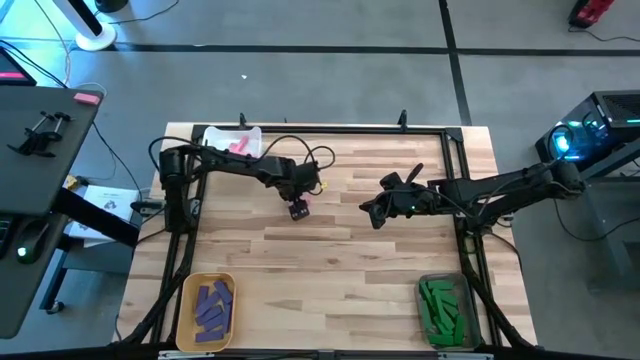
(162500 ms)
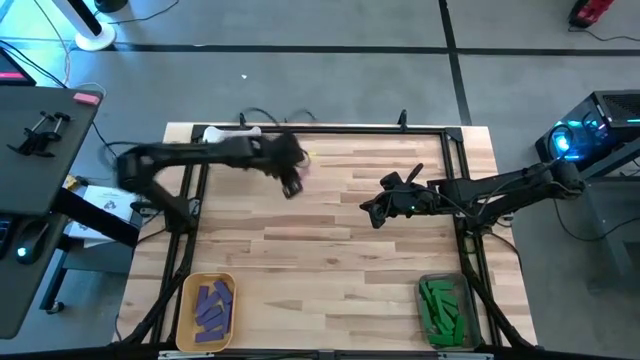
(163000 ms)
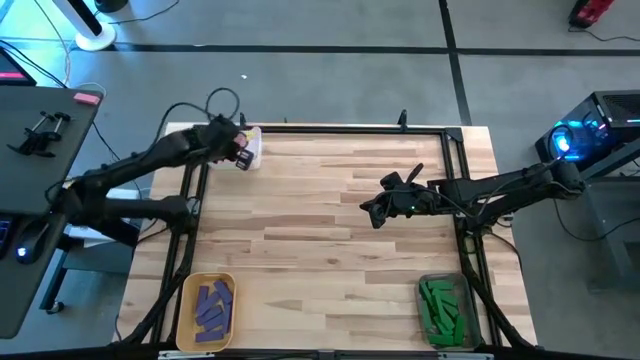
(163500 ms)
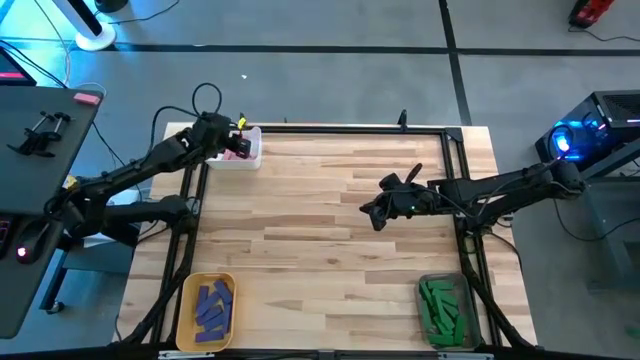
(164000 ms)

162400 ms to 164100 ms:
Task: Sort blocks
Put the pink wooden block into the white bin

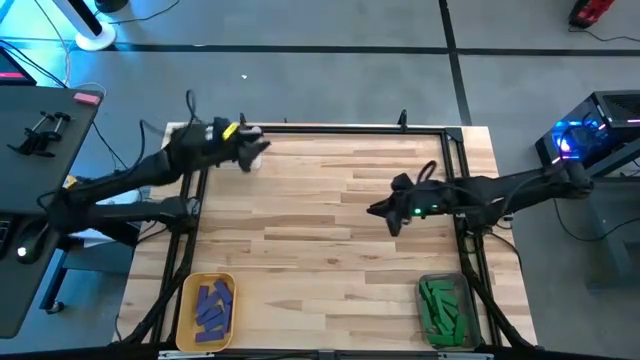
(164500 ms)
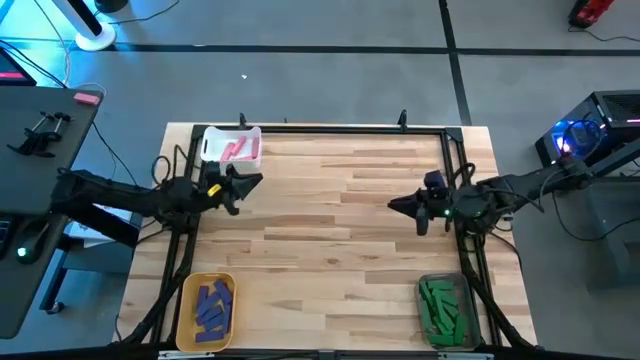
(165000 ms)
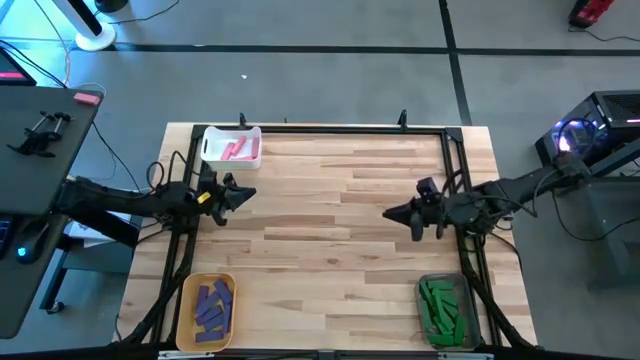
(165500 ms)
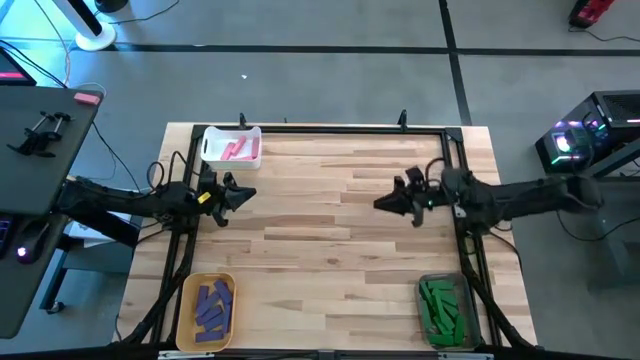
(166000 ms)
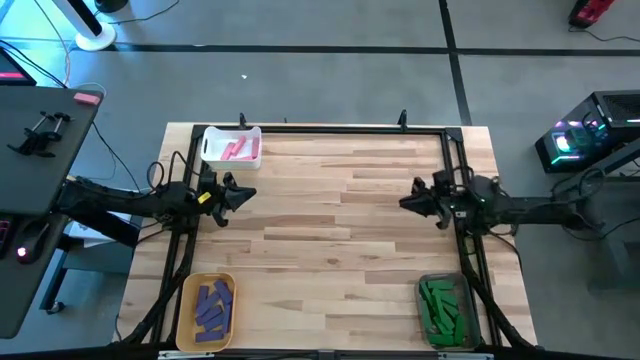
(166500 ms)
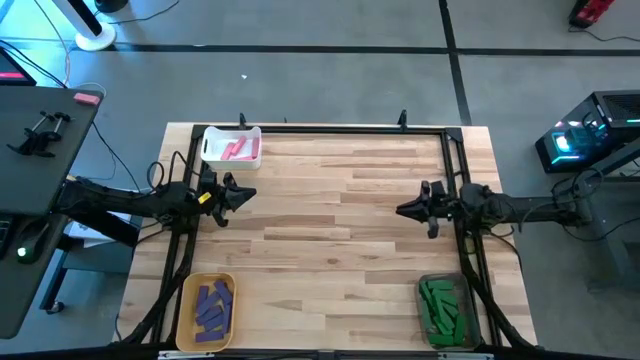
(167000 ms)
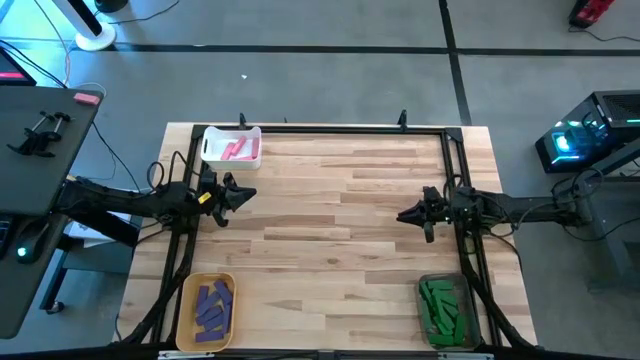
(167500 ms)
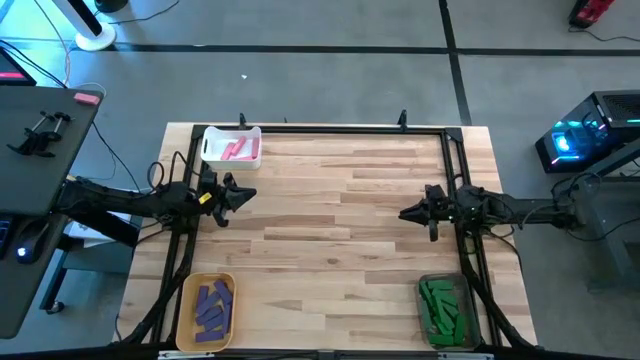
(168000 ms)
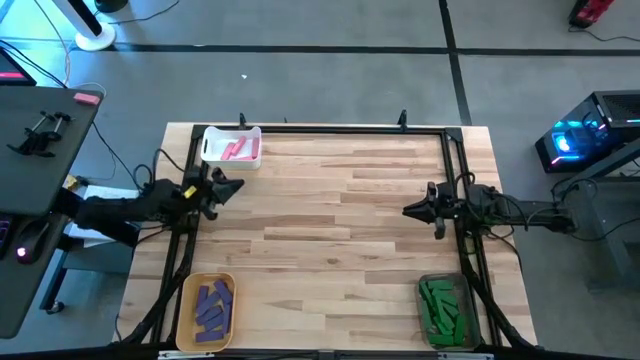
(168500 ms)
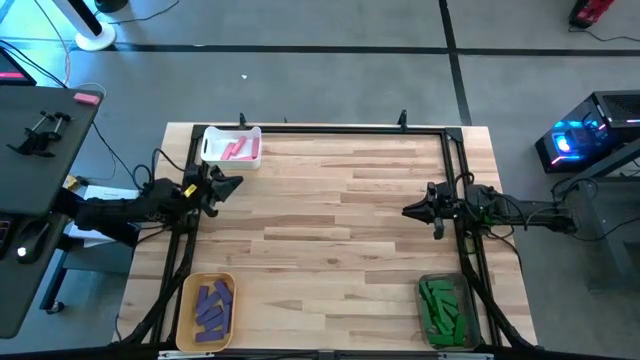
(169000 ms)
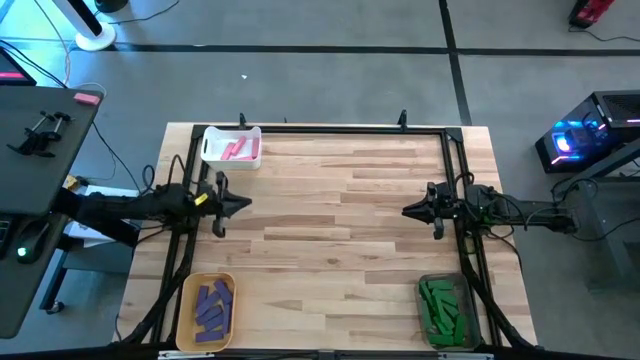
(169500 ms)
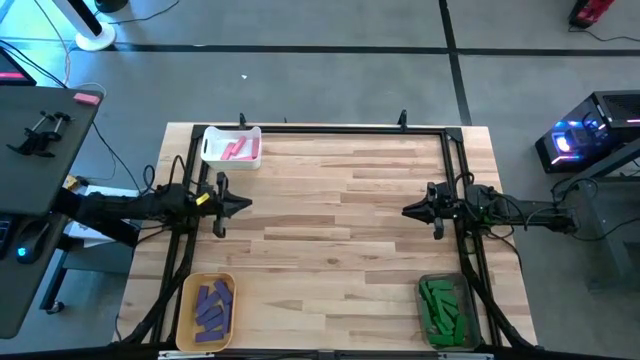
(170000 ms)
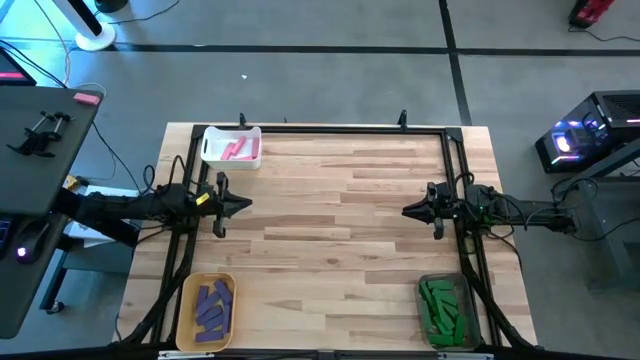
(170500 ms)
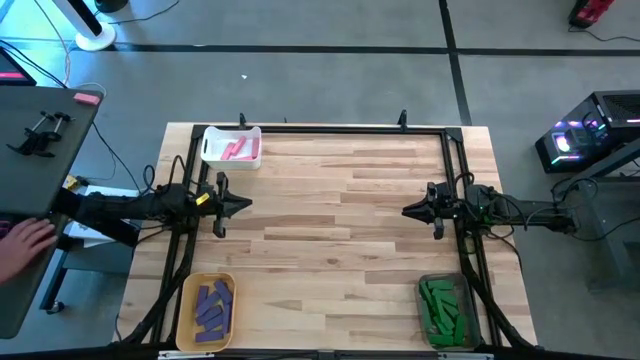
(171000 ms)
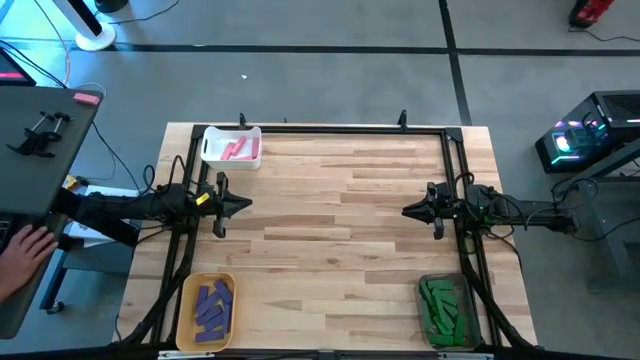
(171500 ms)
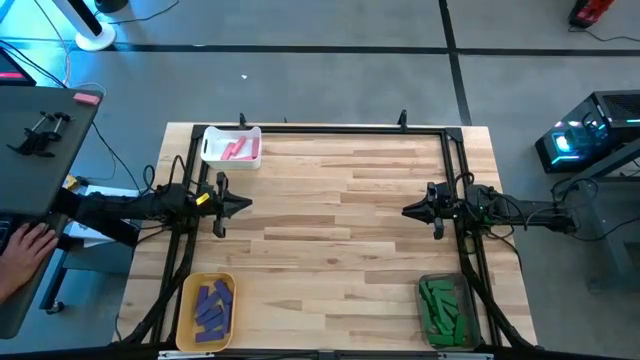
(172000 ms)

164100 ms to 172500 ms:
Return to Home Position

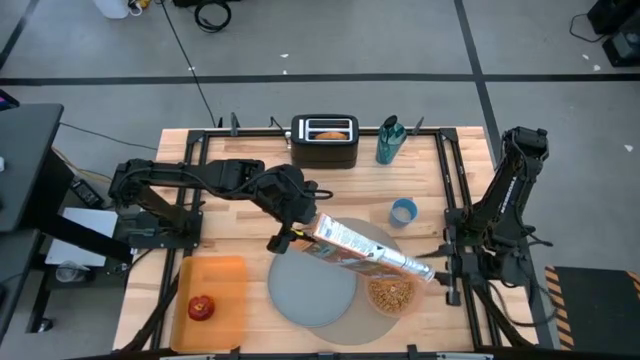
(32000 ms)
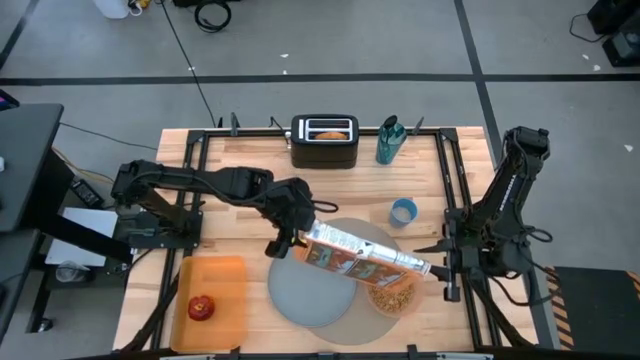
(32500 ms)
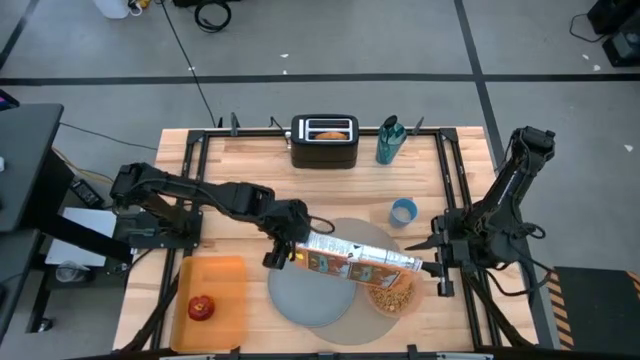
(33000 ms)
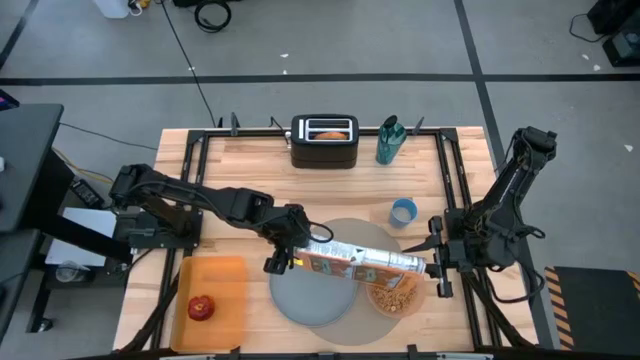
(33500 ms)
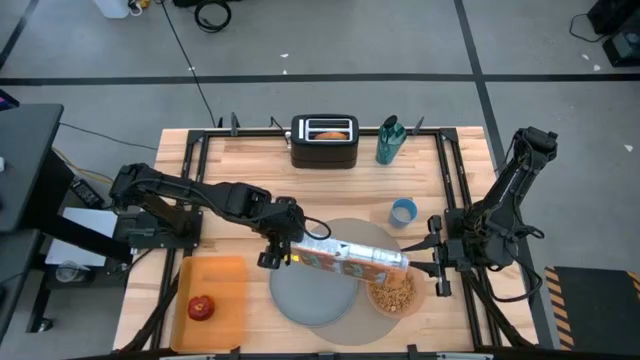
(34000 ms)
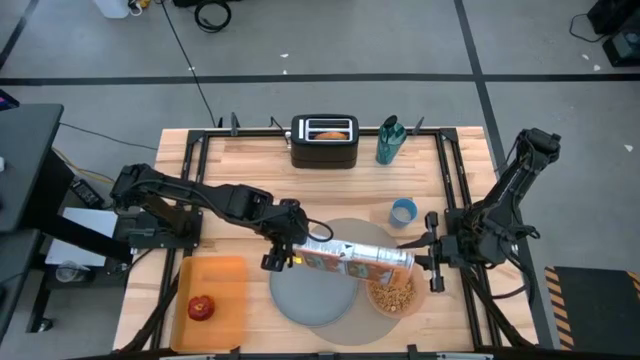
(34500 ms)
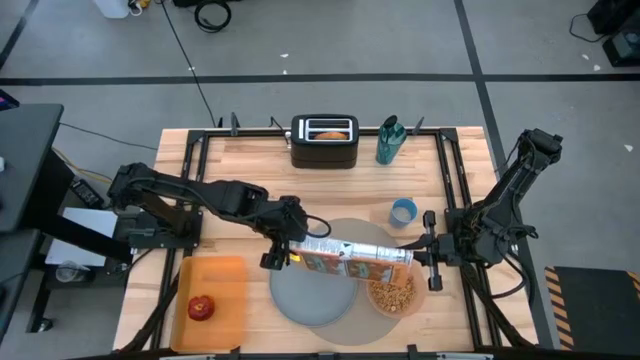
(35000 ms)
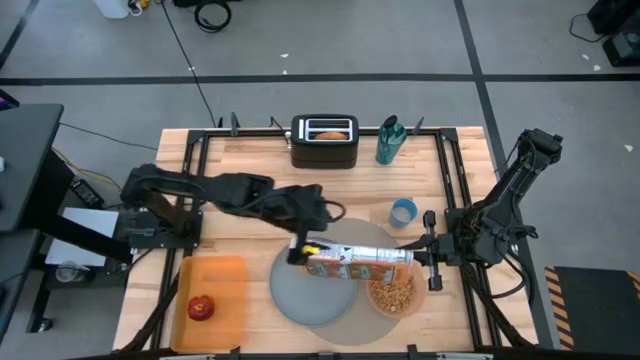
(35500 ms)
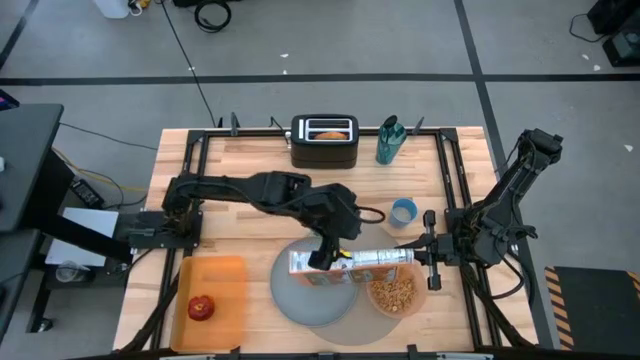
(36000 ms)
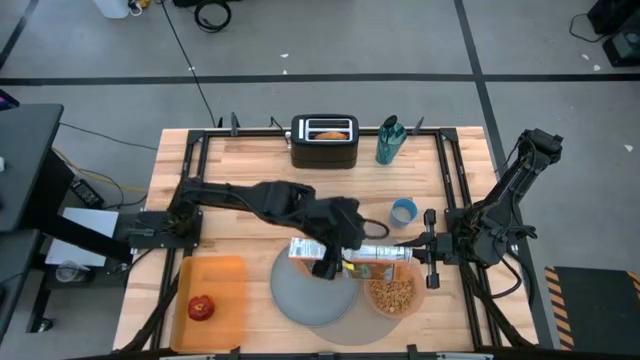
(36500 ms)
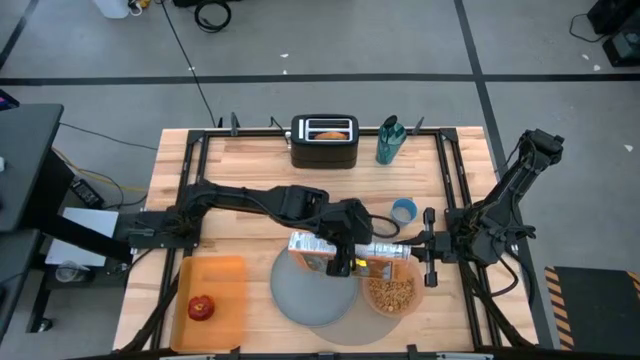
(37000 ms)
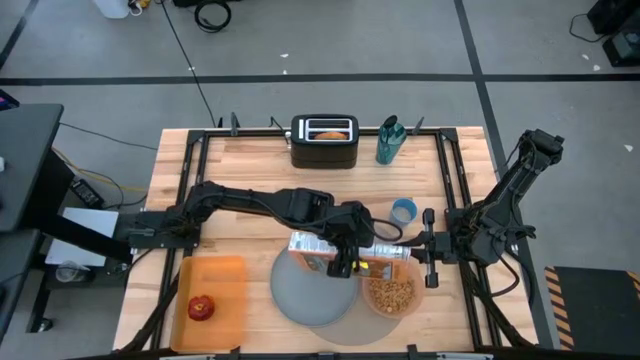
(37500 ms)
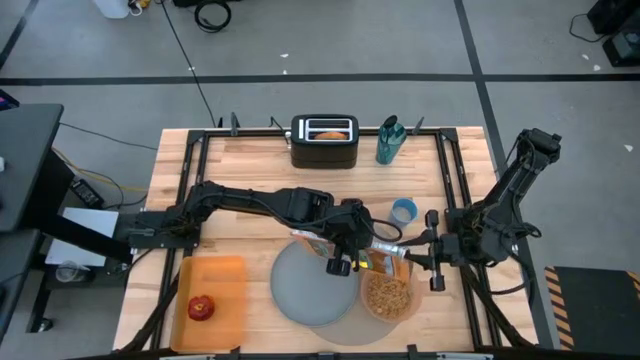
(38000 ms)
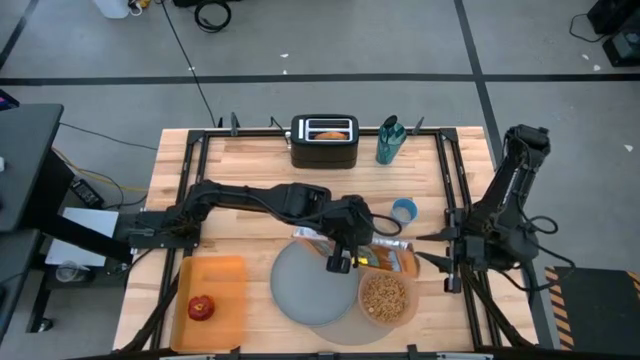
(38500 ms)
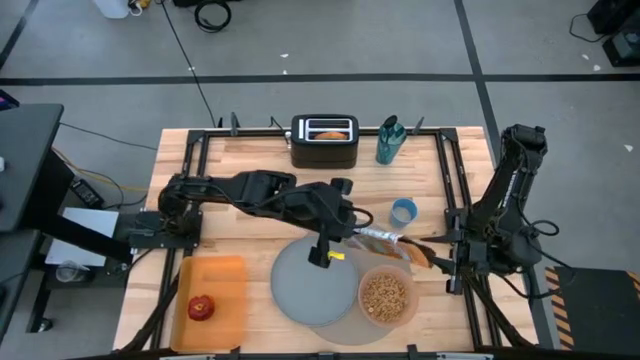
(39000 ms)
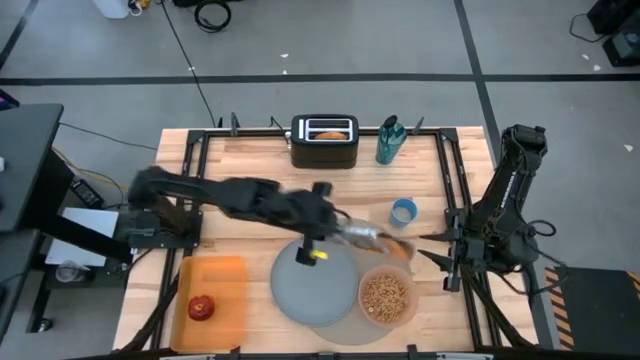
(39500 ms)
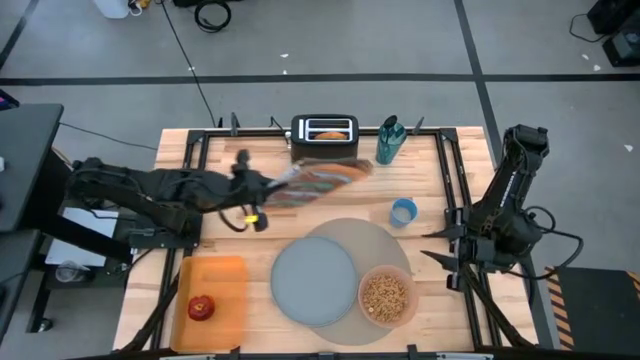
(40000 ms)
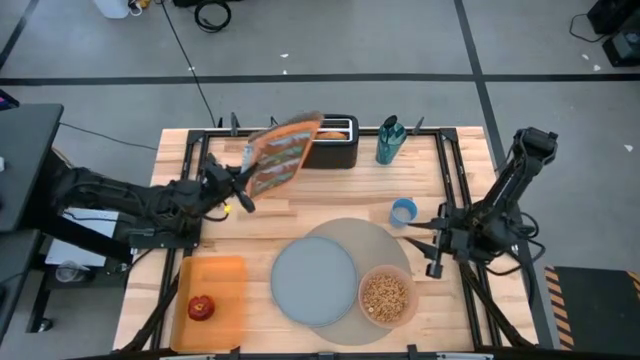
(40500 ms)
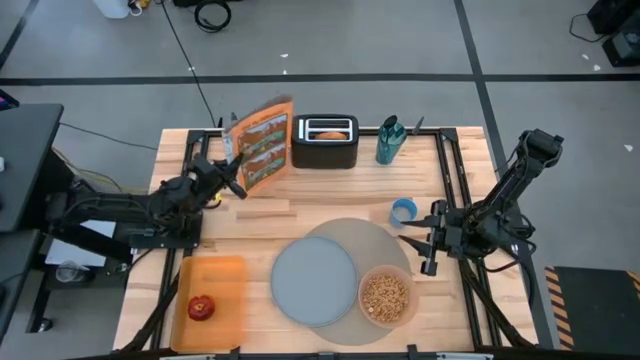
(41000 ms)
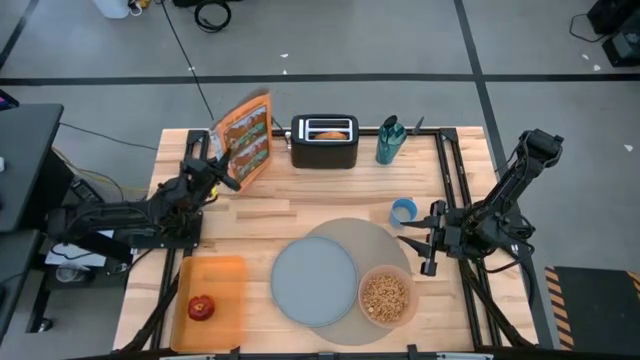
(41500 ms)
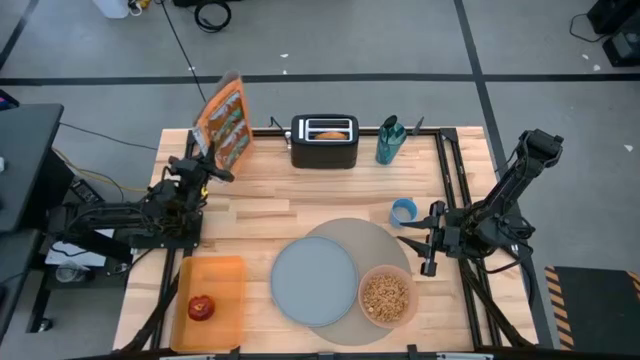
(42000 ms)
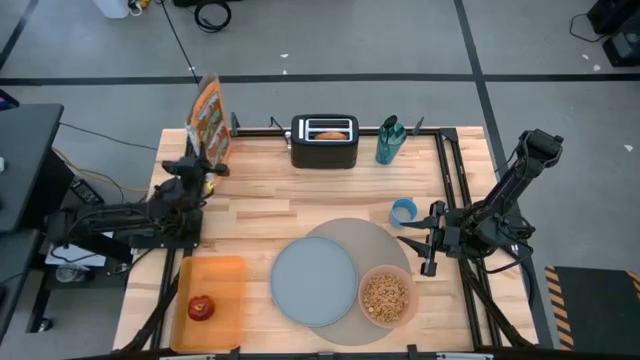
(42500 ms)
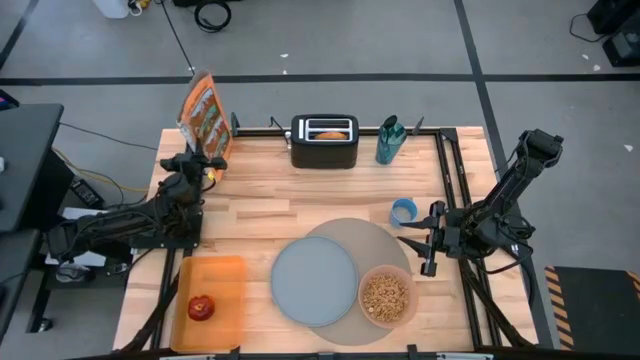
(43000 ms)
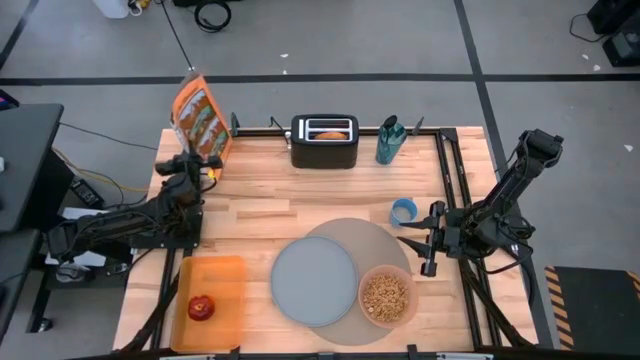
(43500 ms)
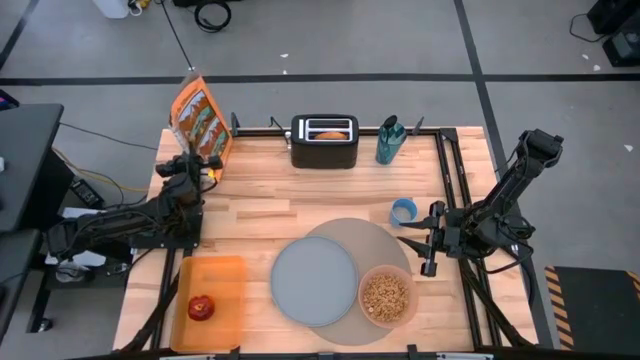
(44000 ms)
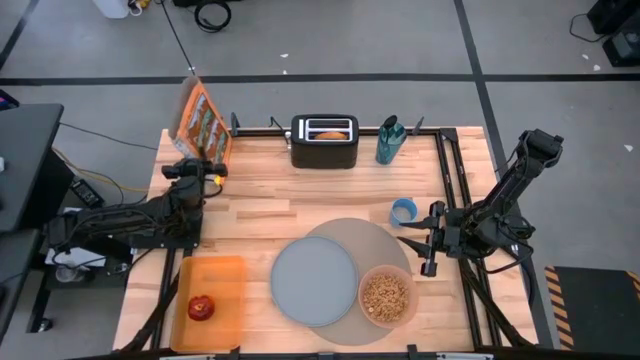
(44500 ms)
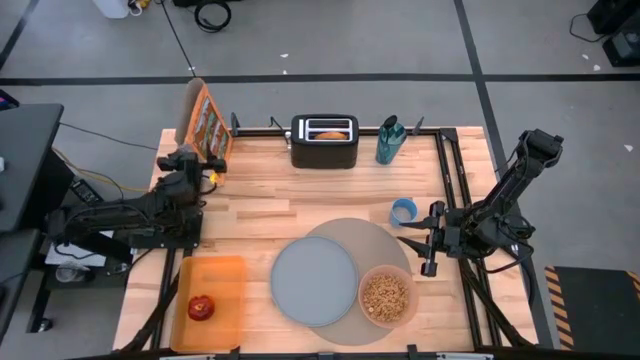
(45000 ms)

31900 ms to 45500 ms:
Task: Arrange a breakfast setting
Pour the cereal from the yellow cereal box into the orange bowl on the brown placemat
